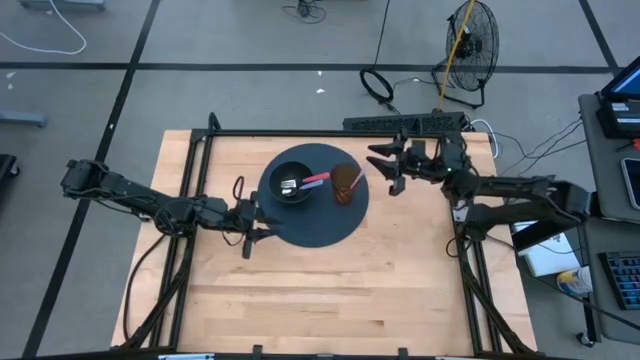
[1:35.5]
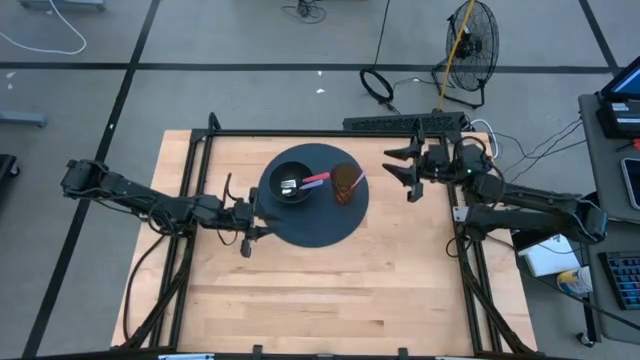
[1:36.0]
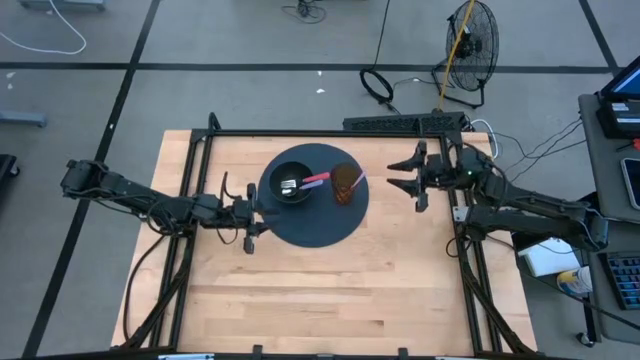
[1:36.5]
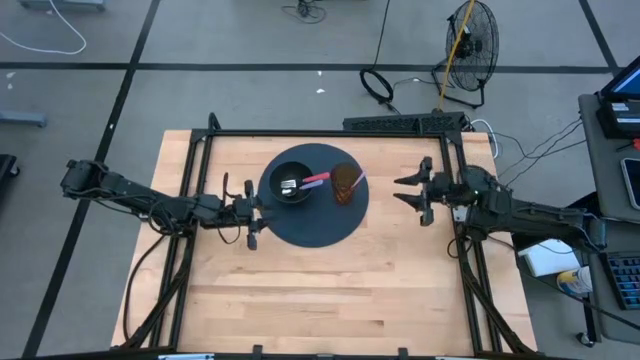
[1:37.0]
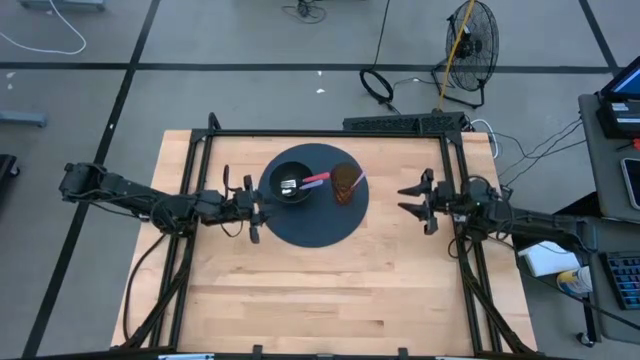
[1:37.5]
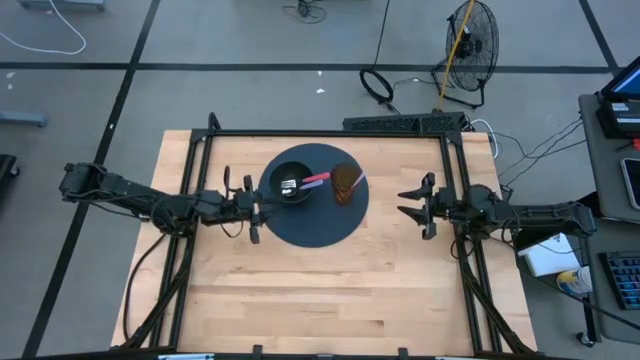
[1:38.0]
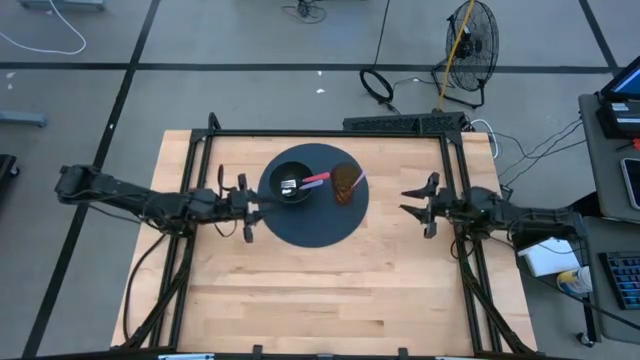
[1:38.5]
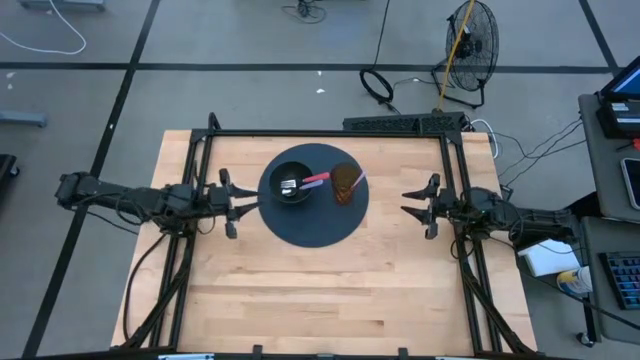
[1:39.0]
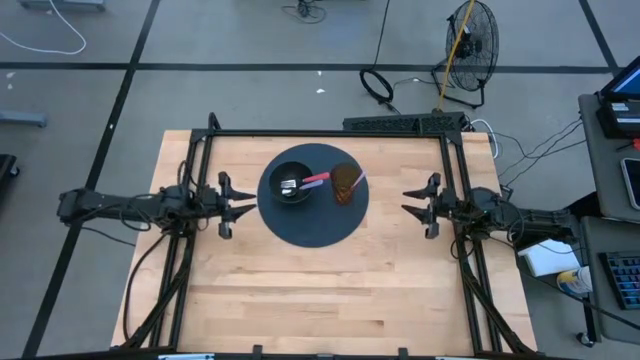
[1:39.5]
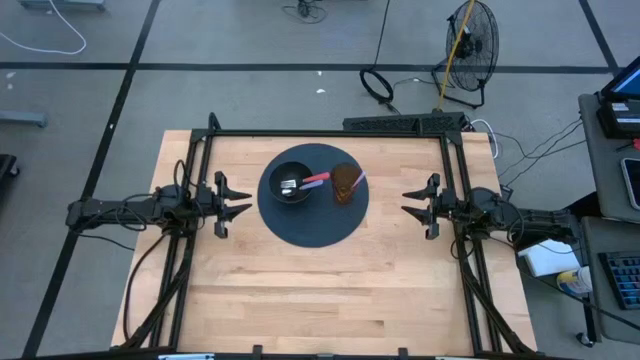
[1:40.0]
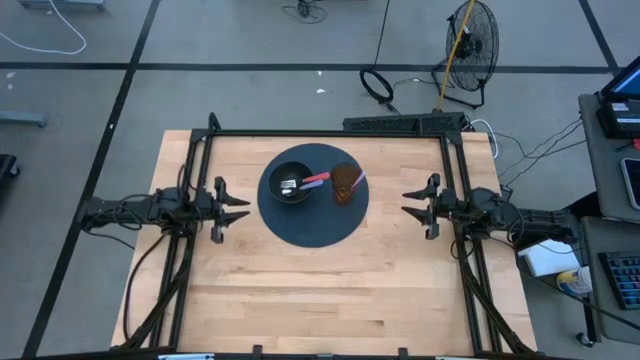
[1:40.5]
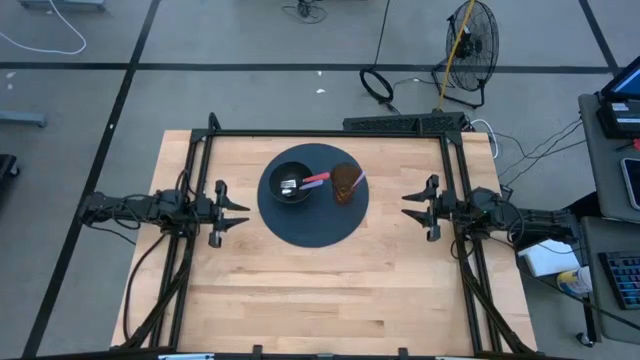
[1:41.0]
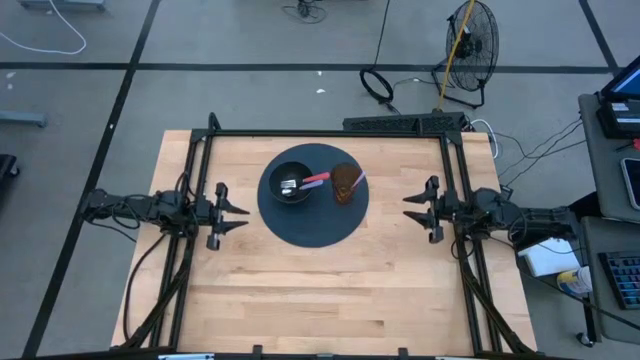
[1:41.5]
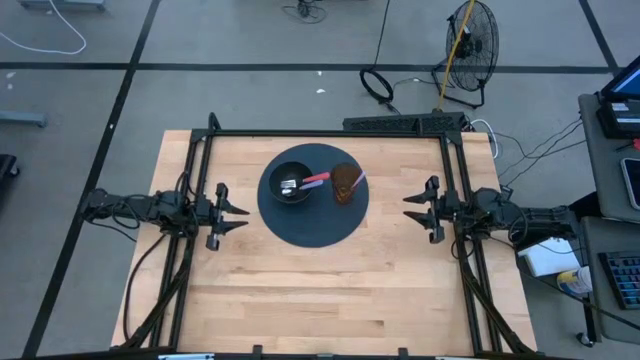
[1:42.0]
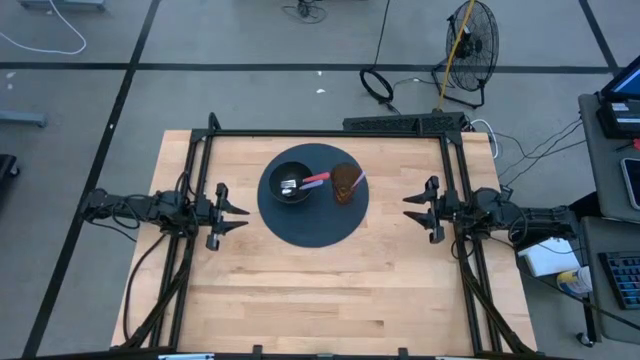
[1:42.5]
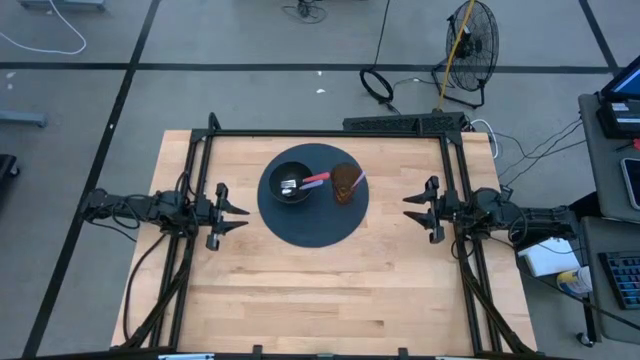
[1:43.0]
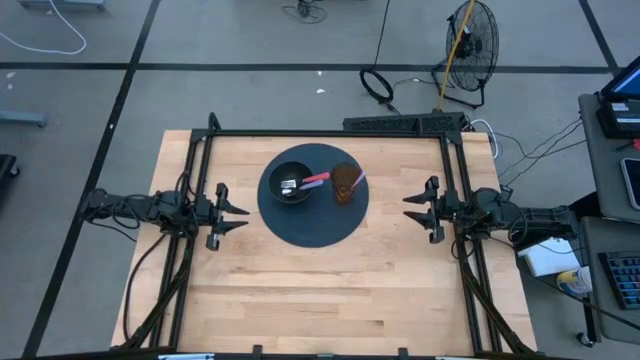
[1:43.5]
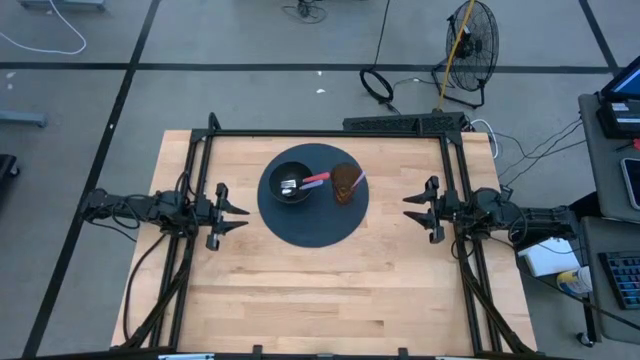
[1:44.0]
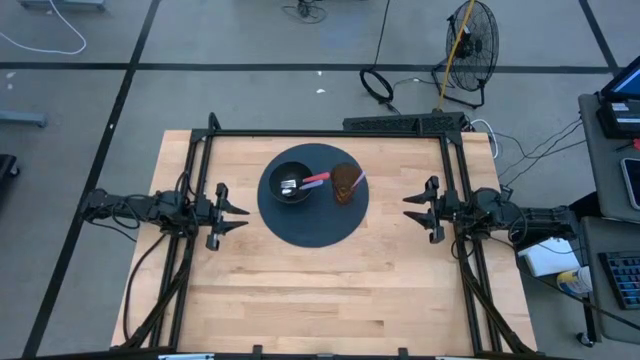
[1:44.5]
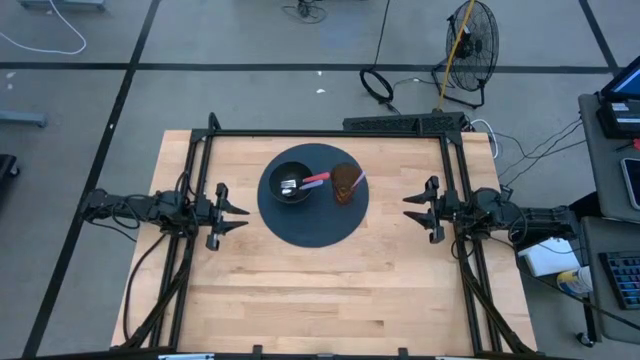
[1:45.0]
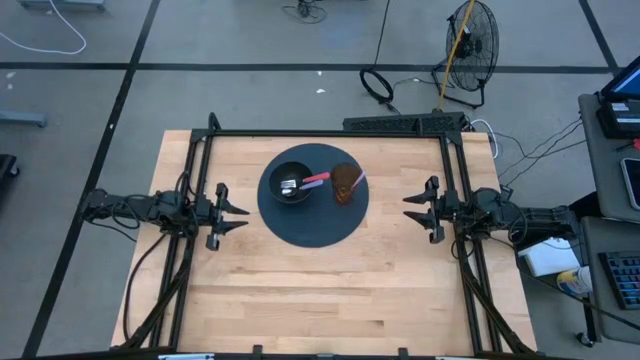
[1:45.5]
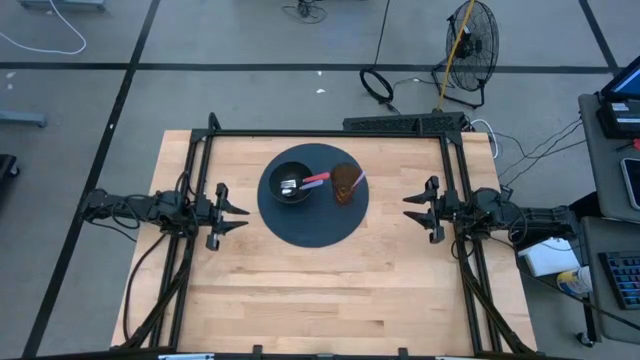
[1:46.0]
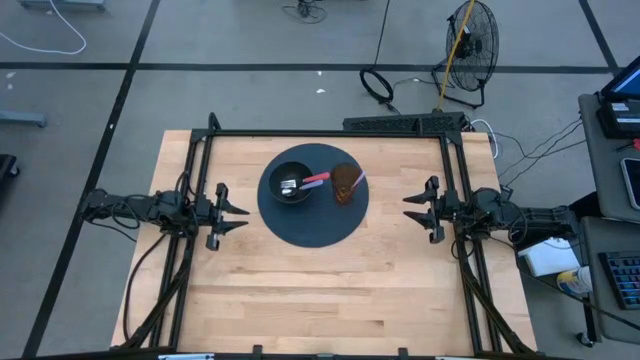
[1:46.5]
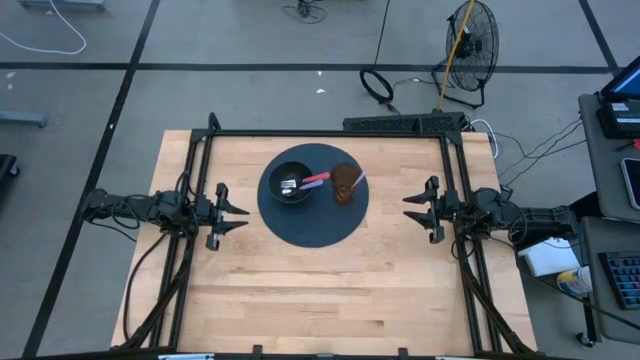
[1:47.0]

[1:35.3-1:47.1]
Task: Pick & Place Utensil
Return to home position

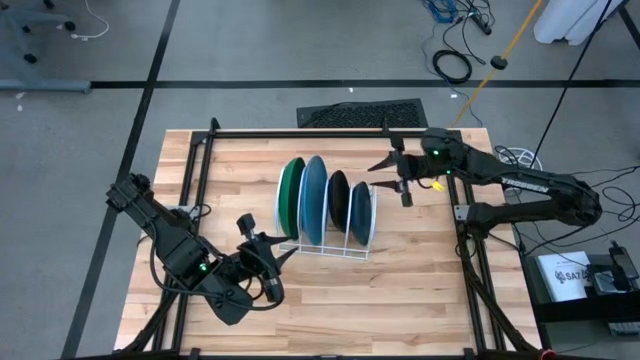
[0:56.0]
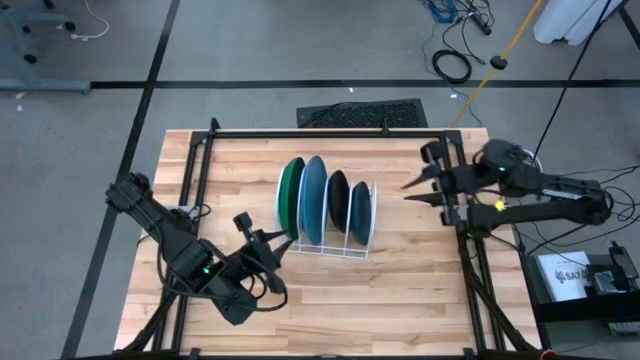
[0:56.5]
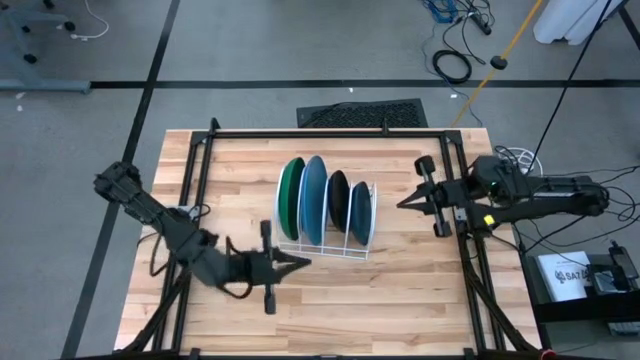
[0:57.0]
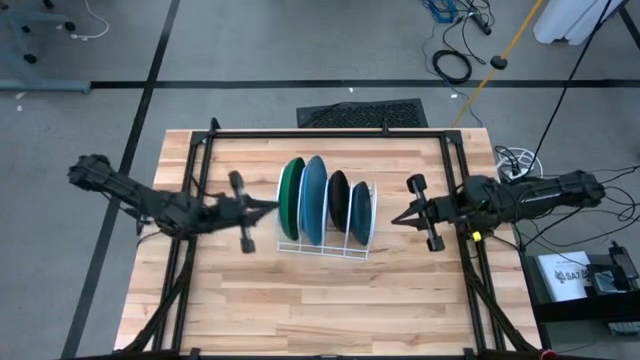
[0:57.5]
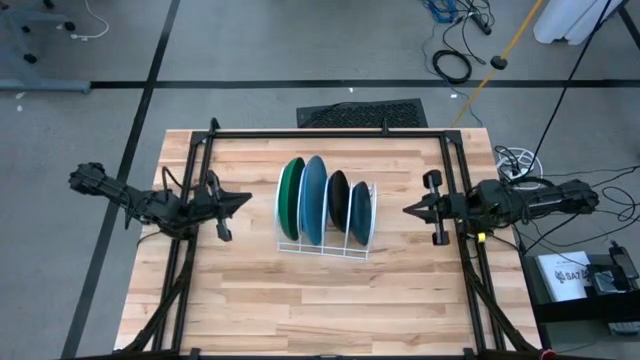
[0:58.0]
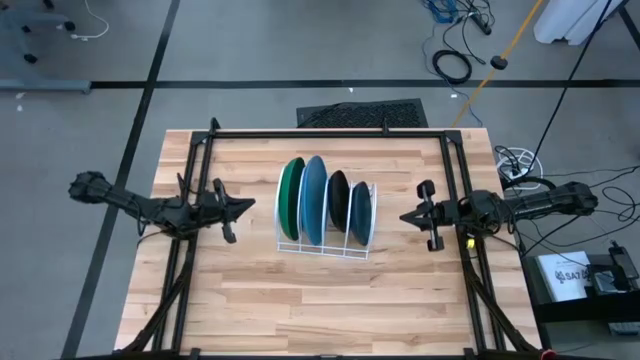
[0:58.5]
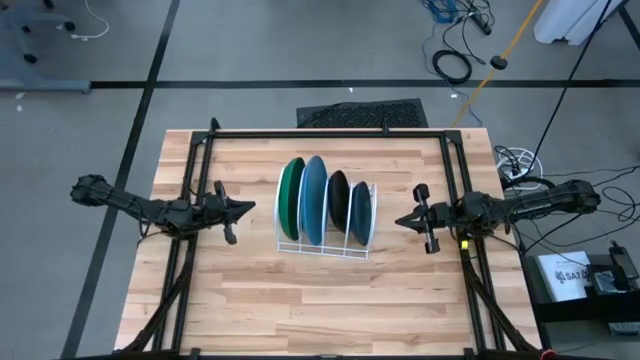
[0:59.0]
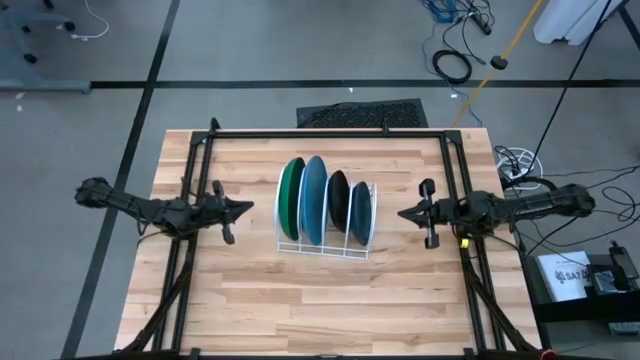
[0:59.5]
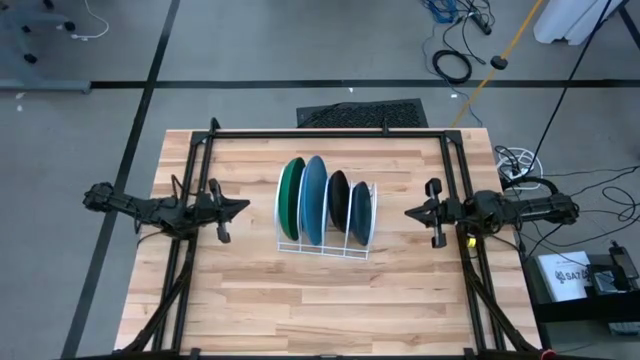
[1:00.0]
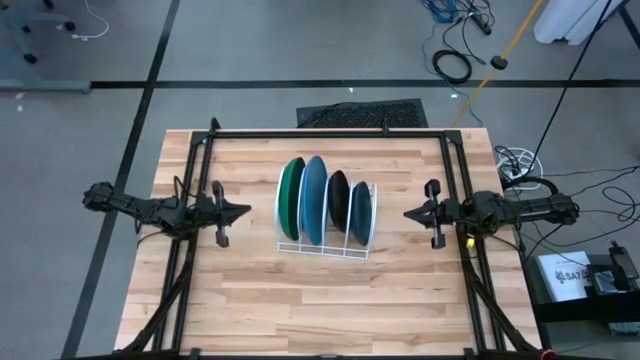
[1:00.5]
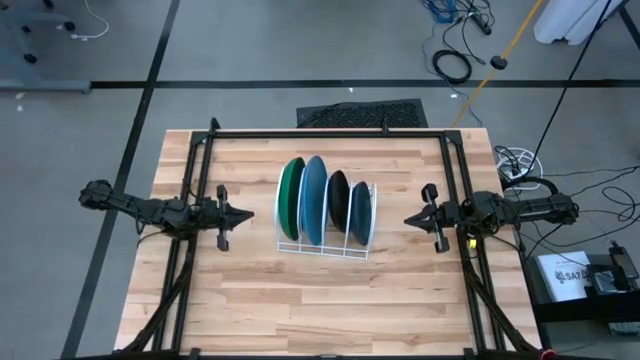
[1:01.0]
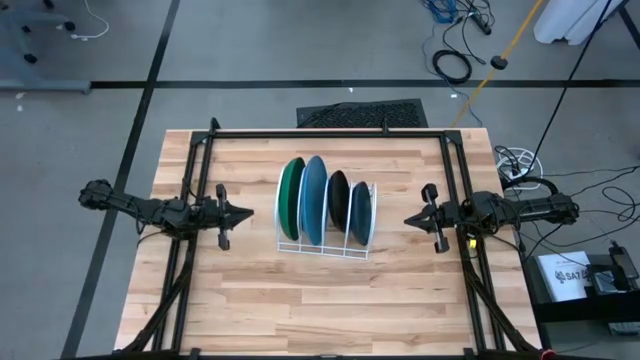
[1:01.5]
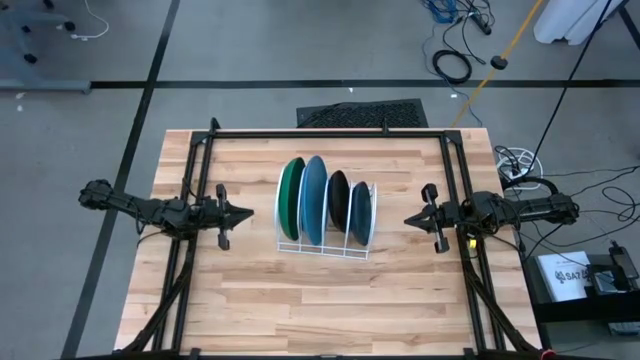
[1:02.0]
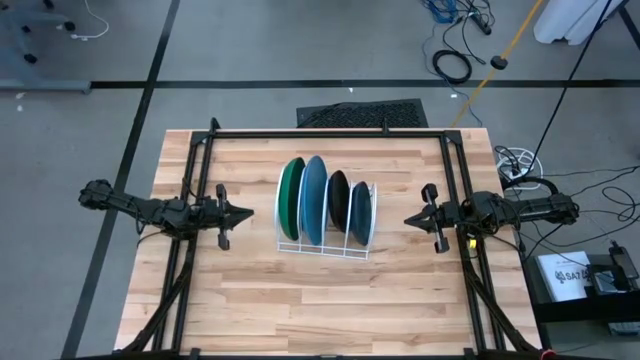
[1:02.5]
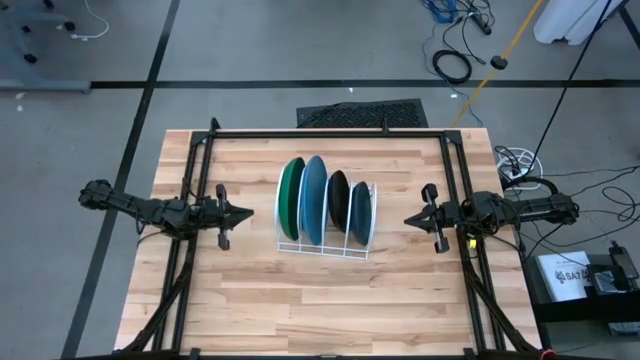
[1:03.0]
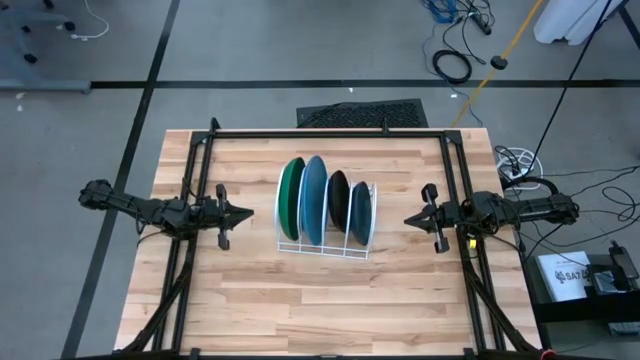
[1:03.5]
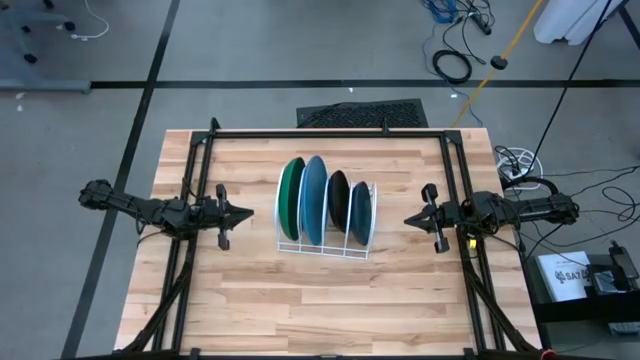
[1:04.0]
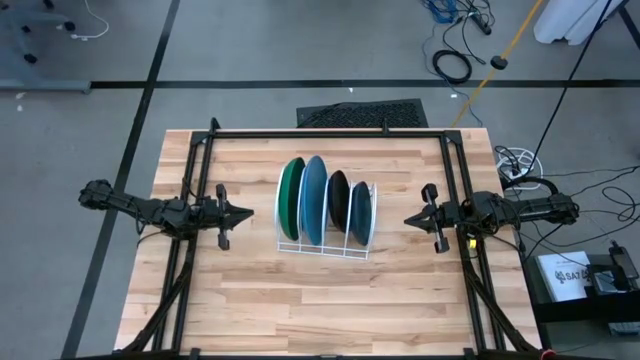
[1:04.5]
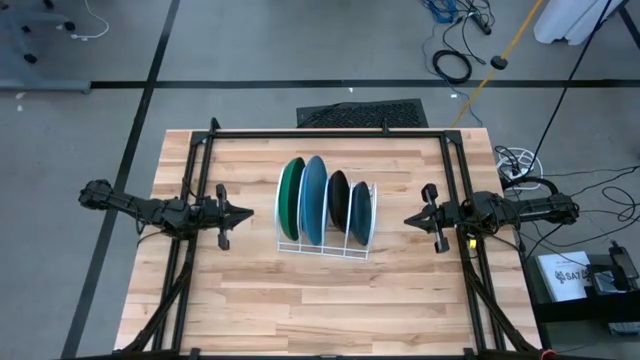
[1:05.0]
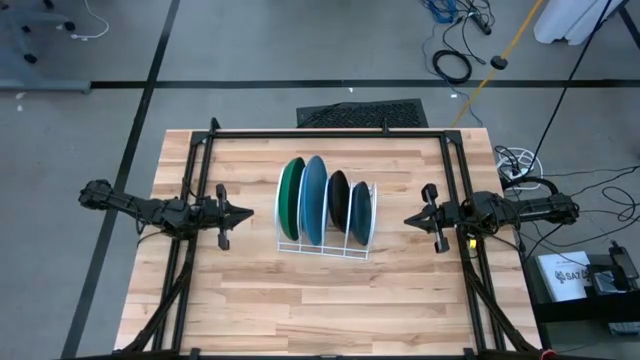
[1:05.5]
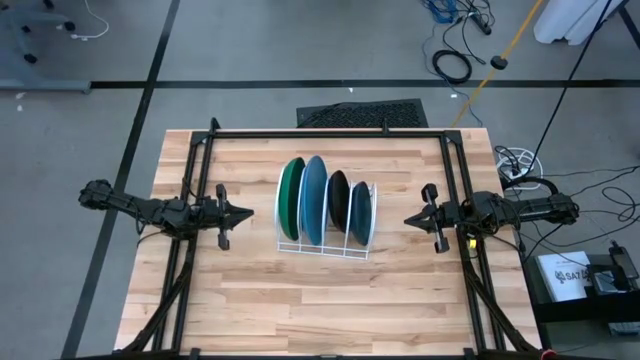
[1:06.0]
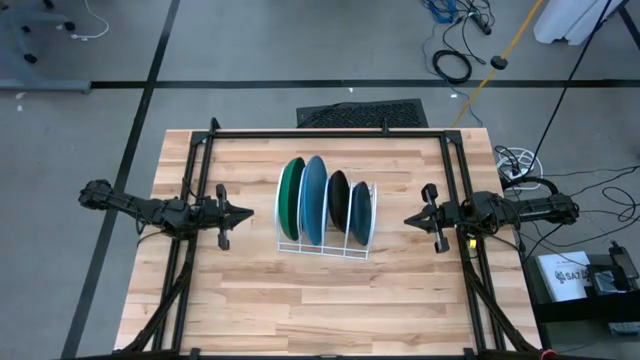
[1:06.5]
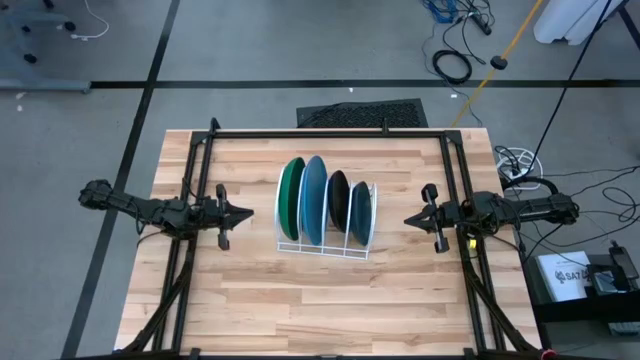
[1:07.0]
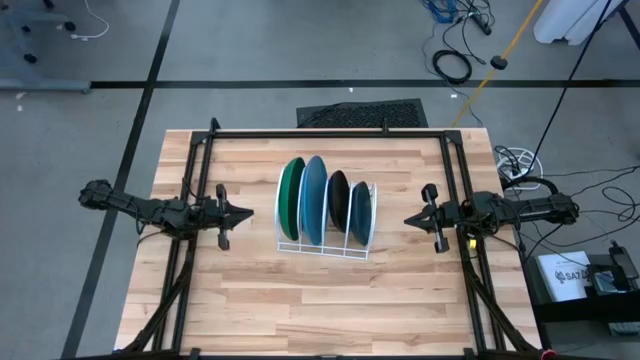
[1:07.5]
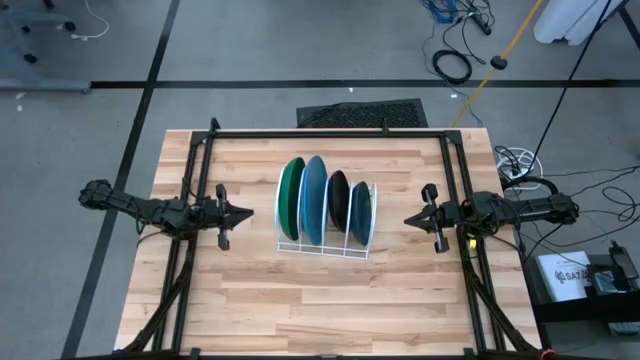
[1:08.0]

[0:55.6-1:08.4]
Task: Sort dishes
Return to Home Position
